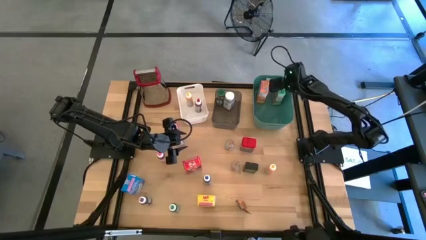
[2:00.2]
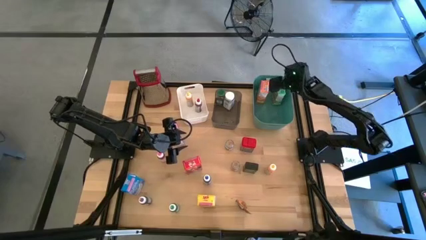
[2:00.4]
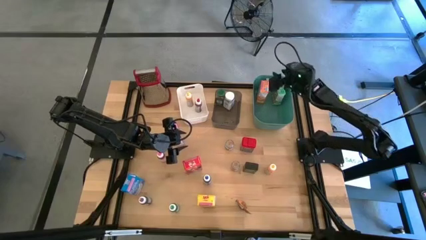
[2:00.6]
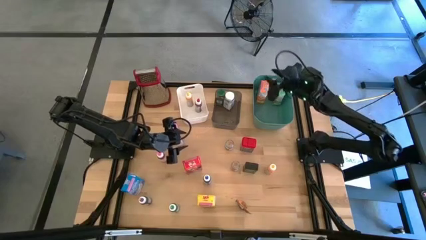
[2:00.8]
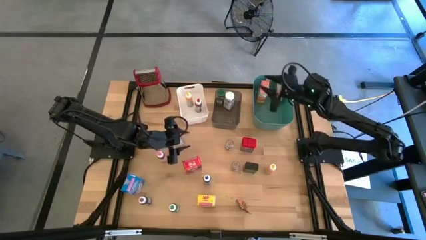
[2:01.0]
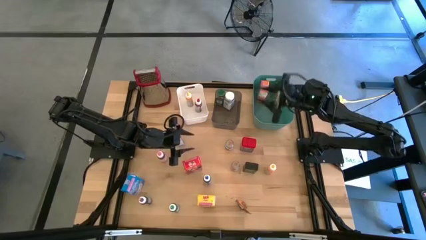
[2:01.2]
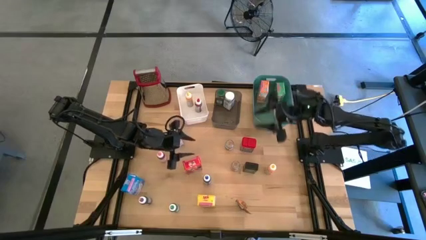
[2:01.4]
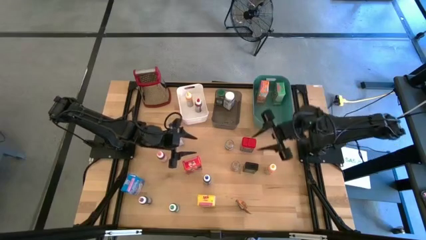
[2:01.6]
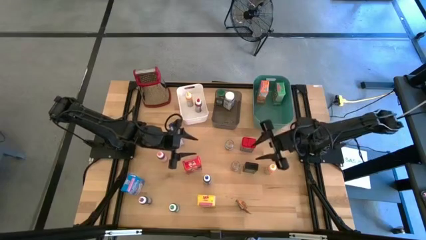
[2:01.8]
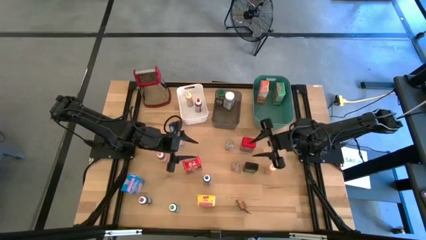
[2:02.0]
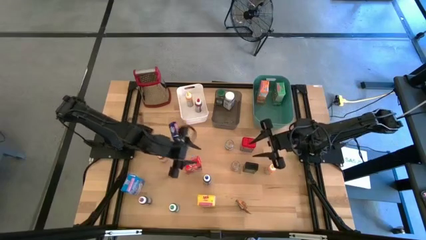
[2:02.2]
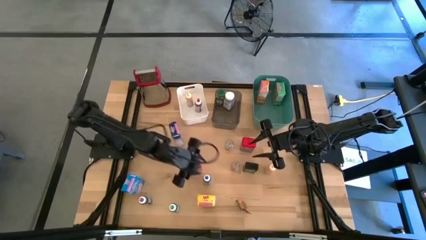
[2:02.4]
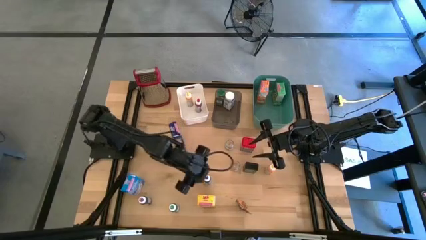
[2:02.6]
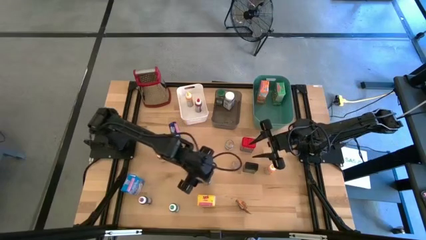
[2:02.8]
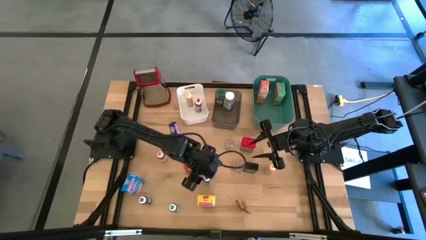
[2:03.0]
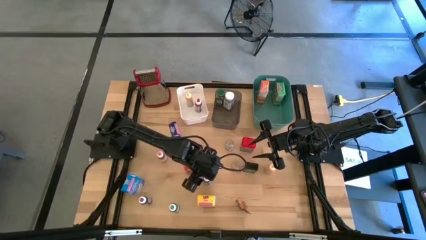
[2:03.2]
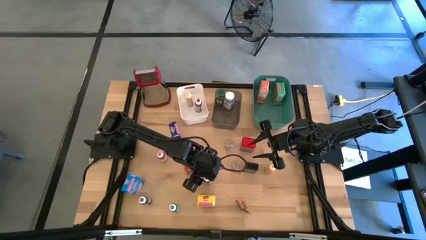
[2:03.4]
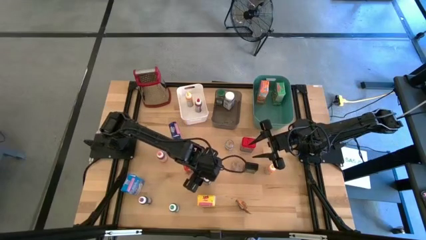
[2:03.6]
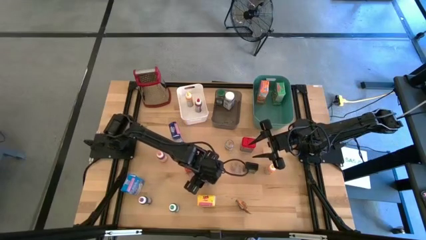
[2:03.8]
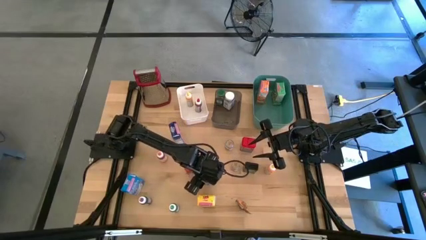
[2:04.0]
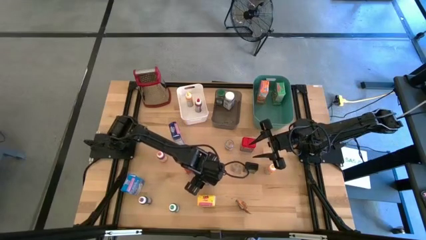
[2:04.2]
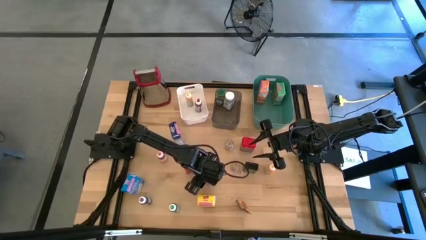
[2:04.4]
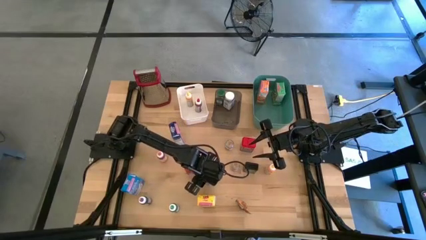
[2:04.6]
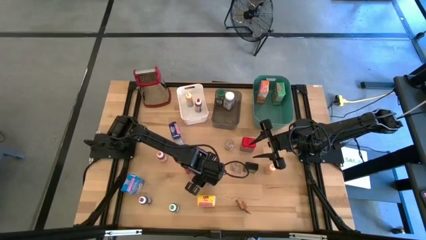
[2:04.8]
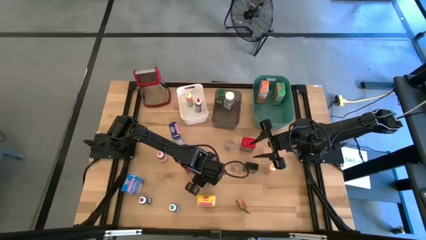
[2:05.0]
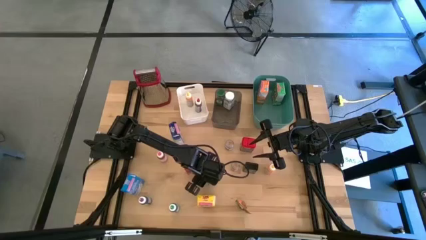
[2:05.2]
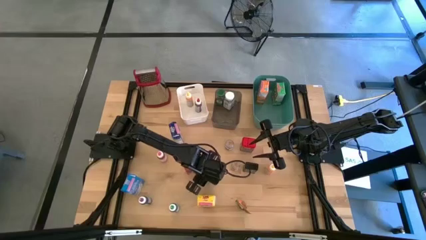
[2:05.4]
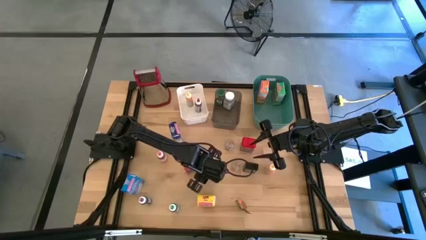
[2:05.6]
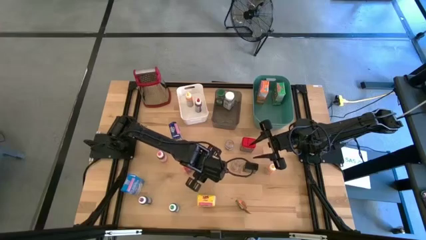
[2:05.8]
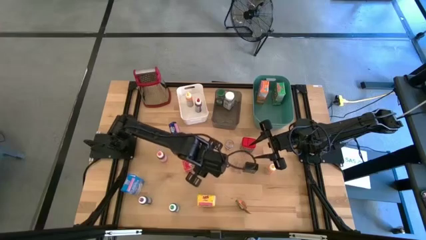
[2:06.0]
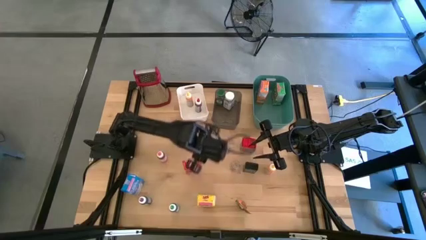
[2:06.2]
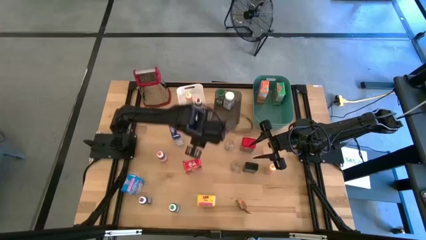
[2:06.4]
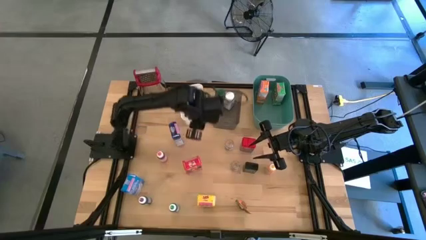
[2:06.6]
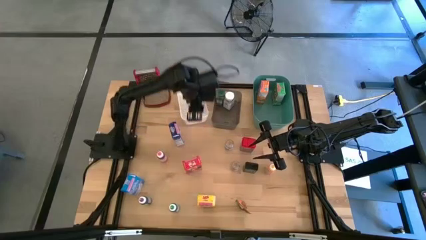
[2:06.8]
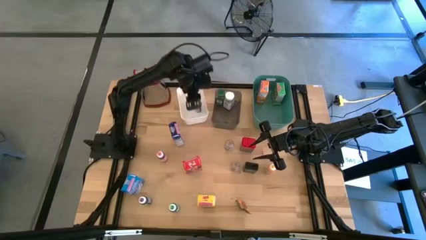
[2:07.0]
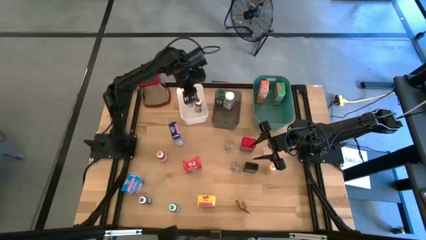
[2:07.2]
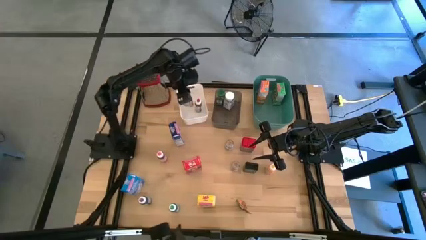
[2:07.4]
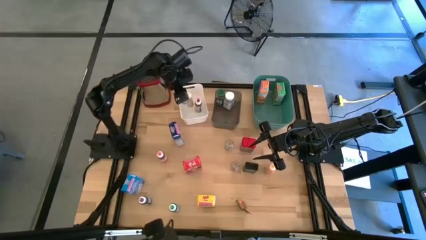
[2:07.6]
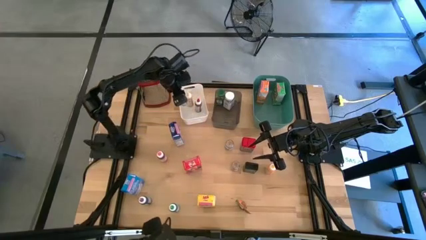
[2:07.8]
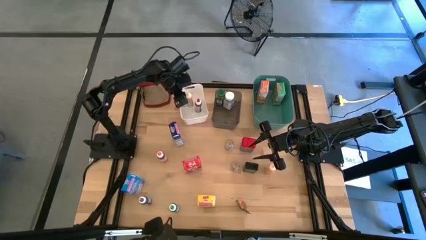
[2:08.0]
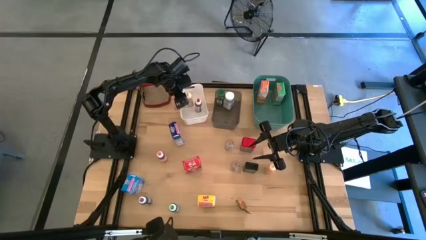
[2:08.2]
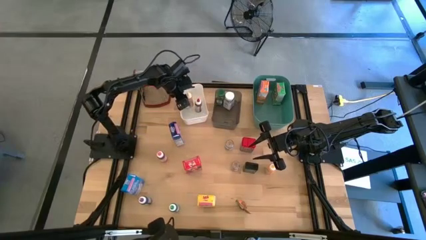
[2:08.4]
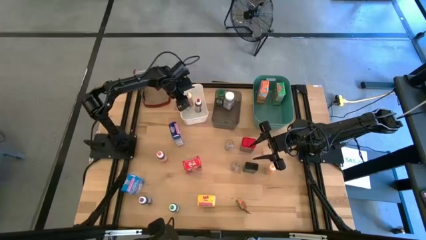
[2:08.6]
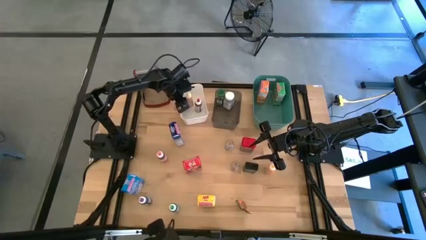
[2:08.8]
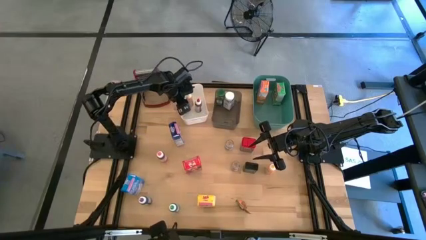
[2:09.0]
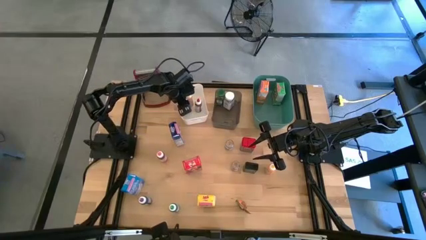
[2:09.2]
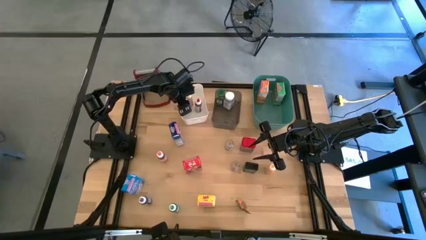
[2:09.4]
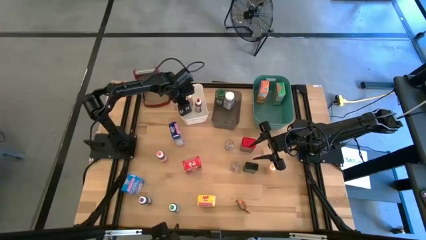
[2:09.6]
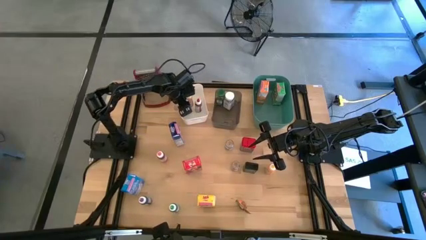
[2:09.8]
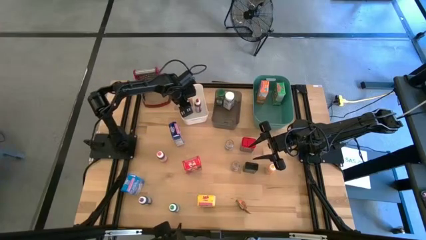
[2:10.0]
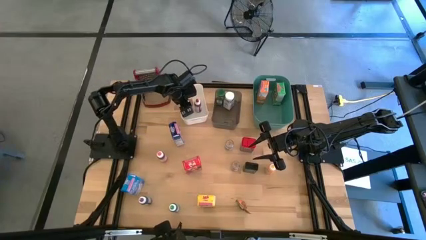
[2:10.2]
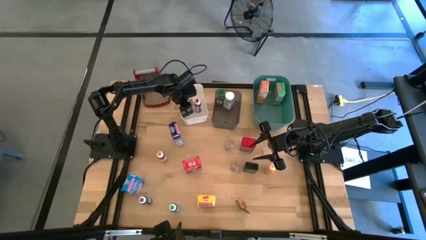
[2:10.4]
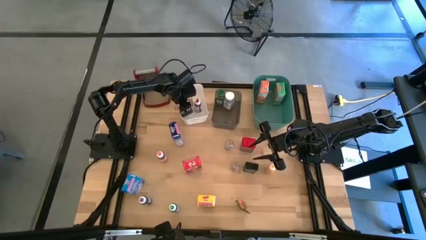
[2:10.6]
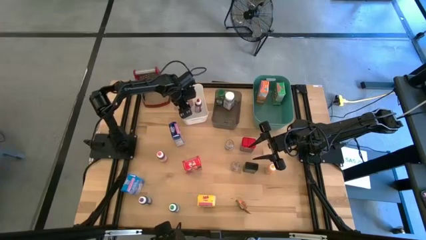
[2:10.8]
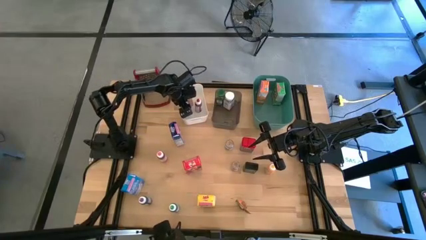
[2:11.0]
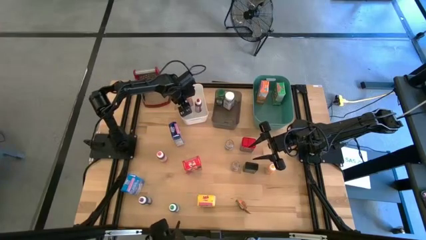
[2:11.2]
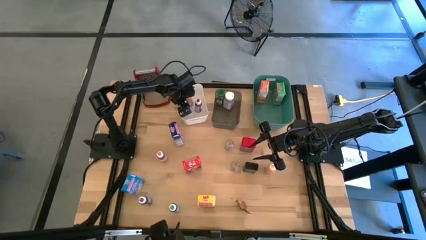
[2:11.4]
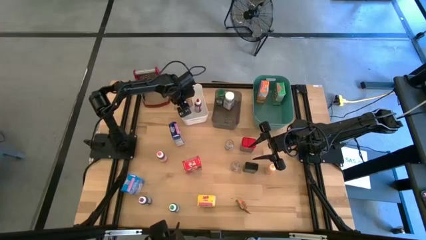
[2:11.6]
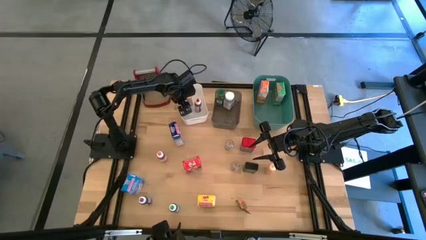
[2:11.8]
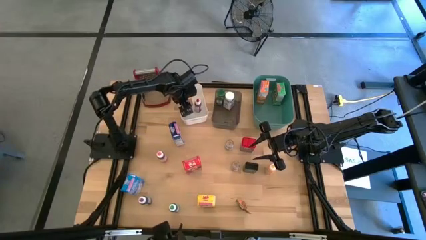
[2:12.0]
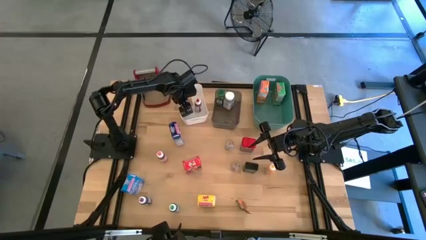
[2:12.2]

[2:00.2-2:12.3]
Task: Pick & Place Kitchen Items
Put the blue food coloring into the white bin

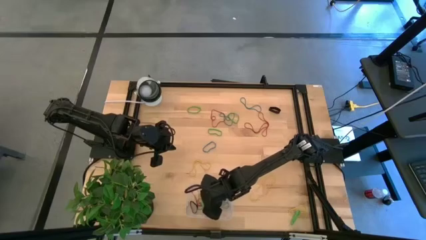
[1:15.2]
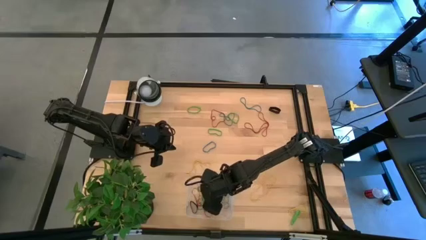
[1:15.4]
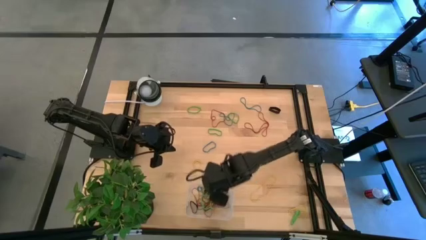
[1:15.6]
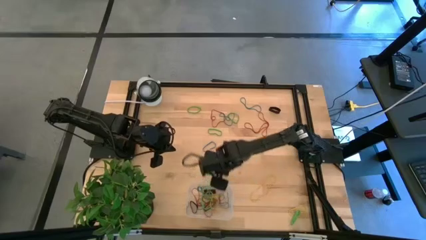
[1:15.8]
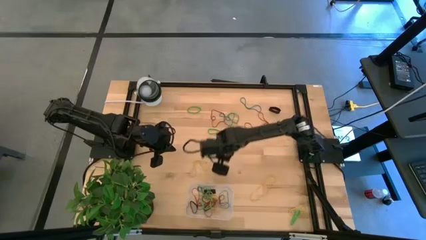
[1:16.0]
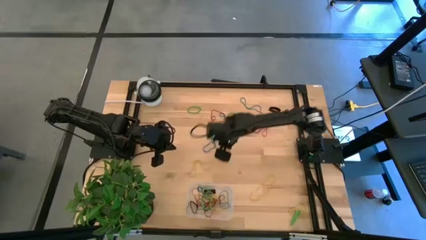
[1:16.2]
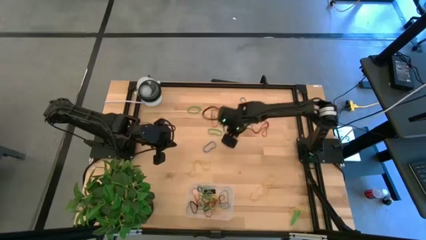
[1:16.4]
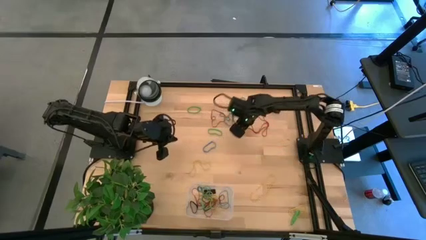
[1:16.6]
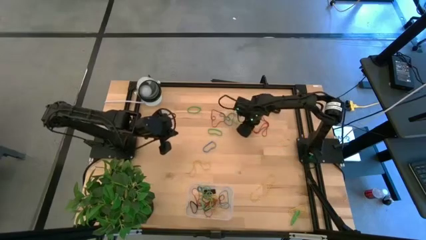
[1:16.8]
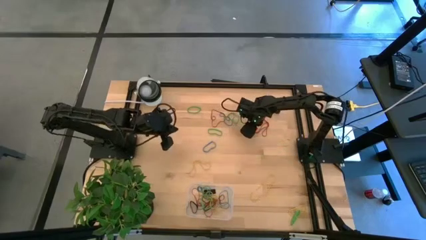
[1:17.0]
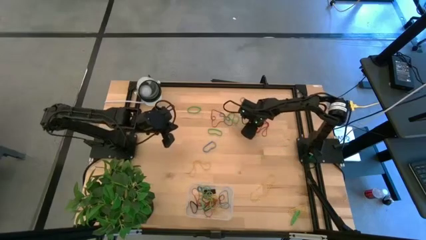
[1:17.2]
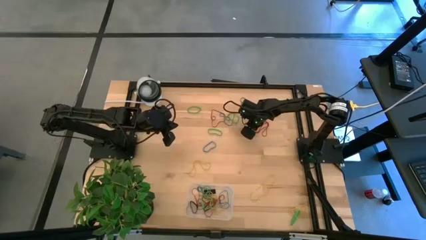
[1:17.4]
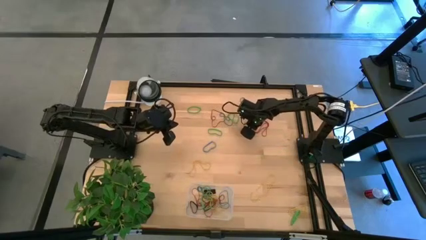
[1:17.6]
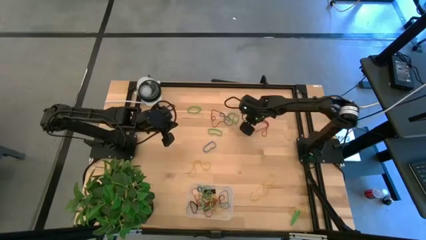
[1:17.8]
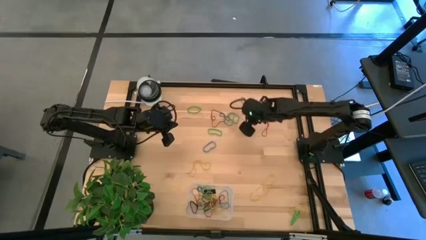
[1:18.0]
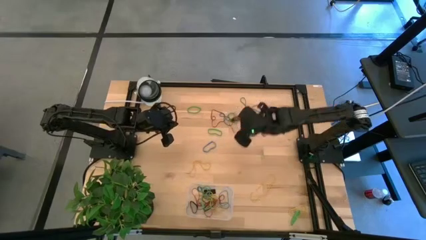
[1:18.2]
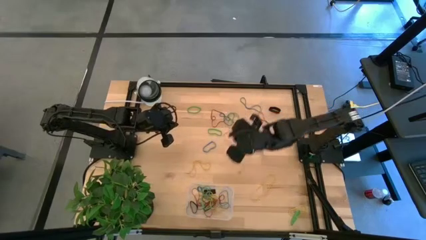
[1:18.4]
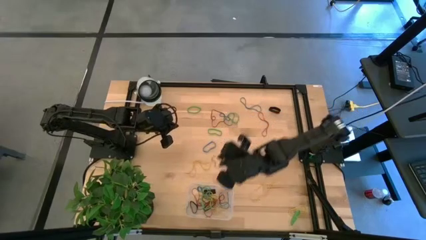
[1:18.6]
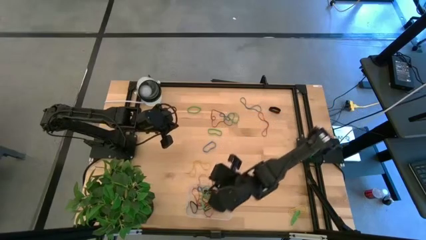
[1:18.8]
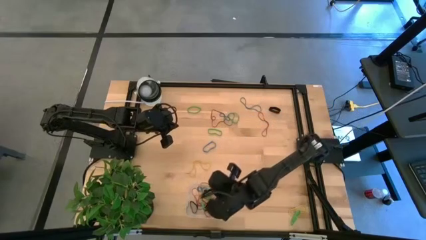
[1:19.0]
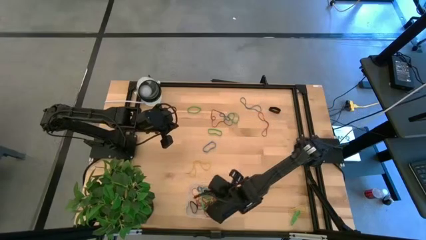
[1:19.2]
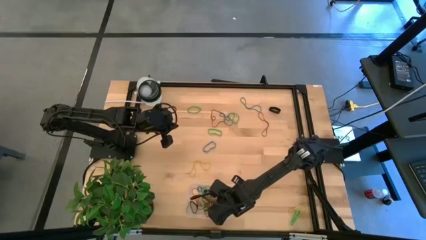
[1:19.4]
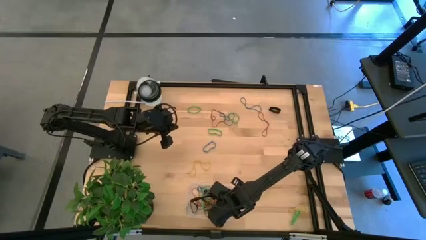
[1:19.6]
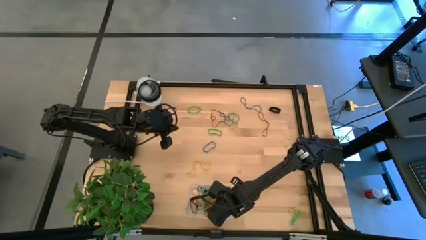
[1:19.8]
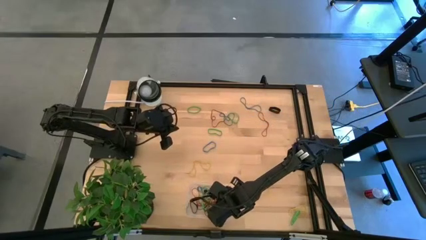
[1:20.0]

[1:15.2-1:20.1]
Task: Pick and place rubber bands into bin
Put the red rubber band into the transparent bin
